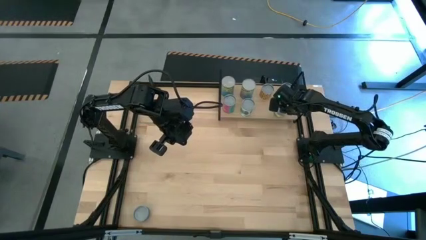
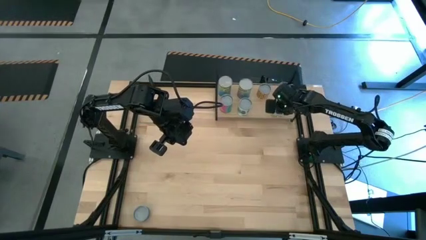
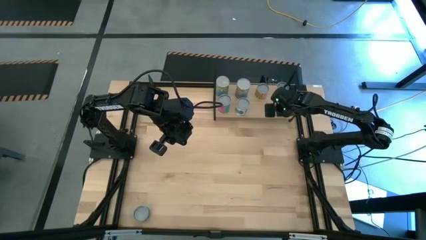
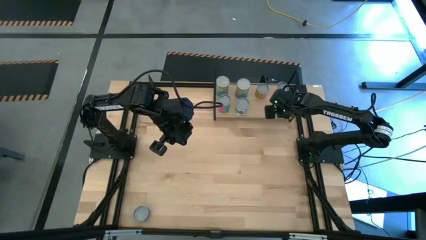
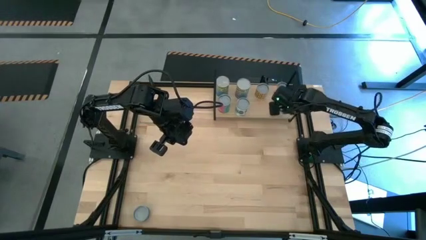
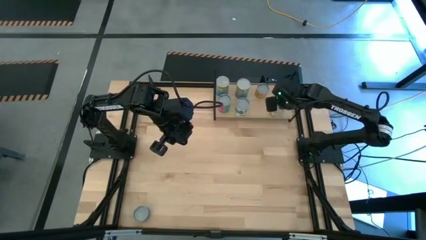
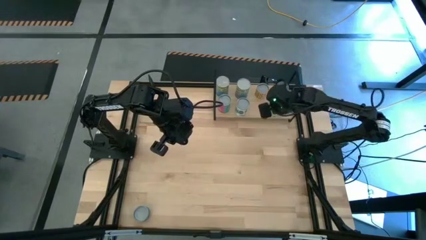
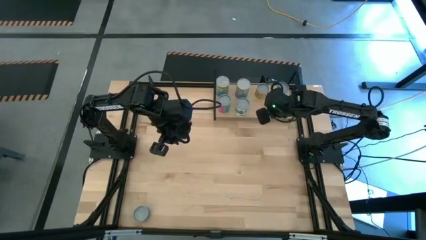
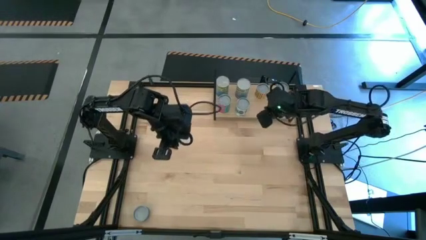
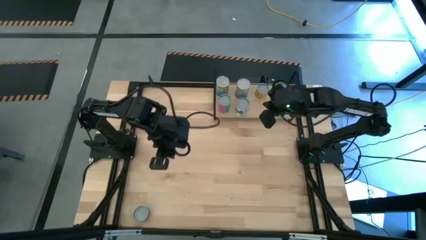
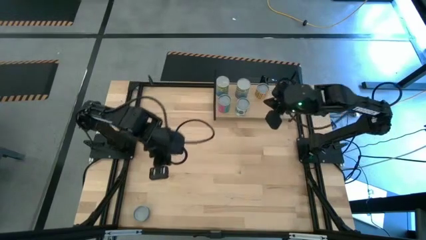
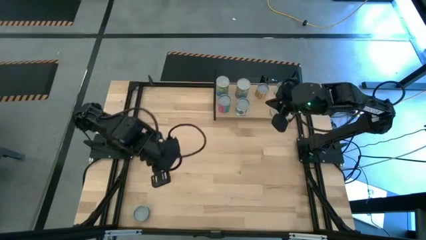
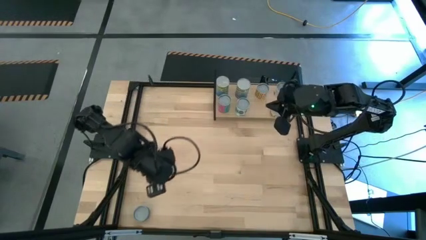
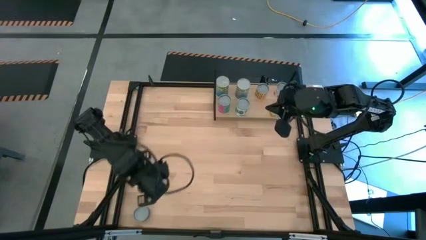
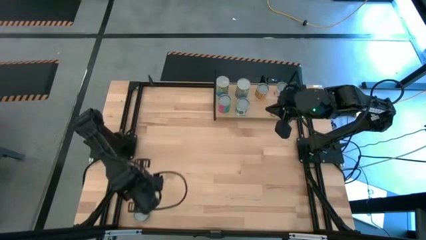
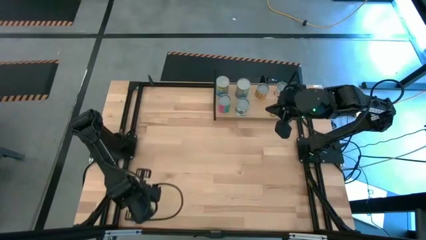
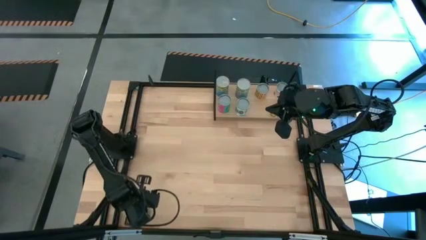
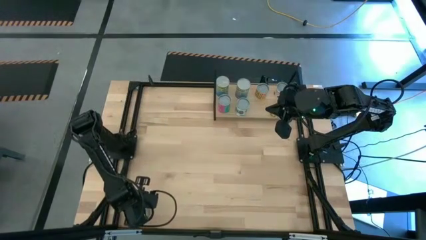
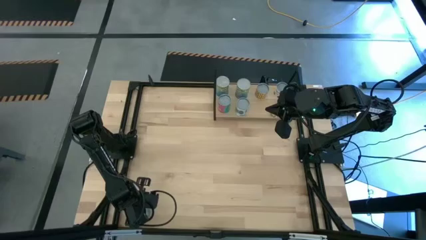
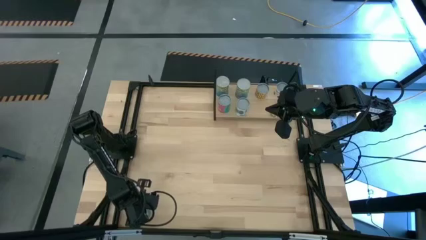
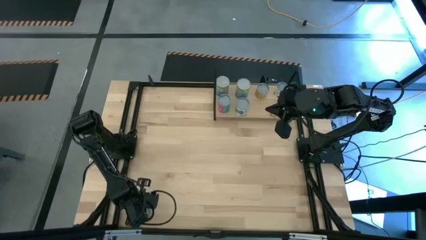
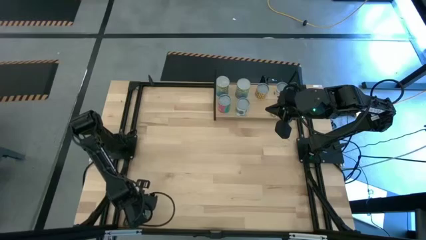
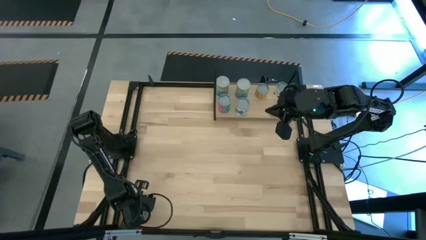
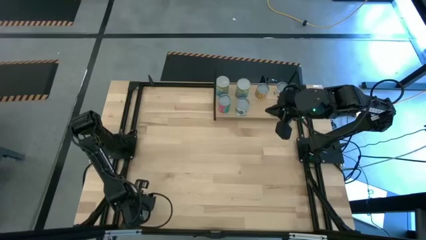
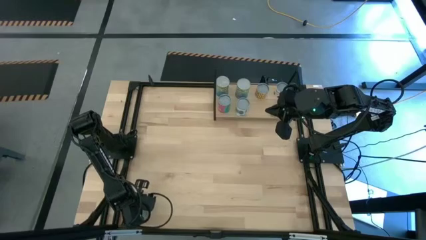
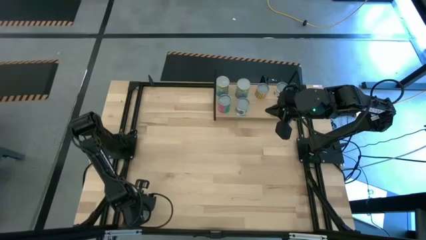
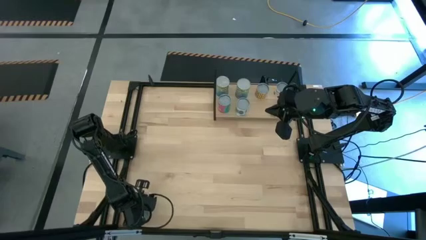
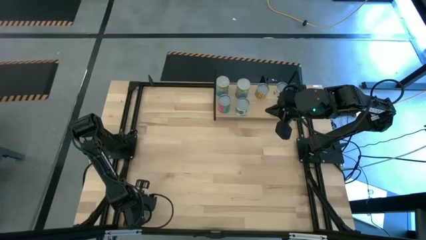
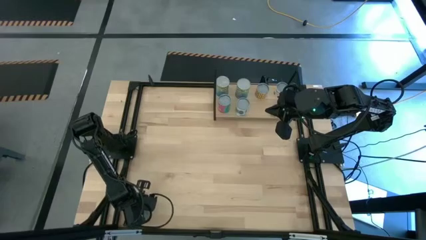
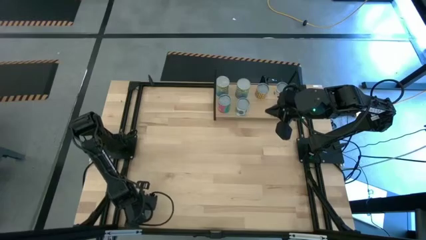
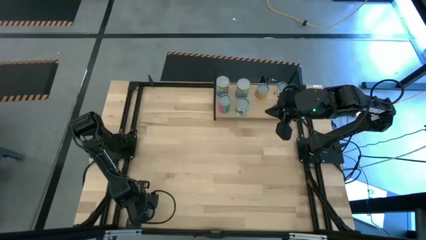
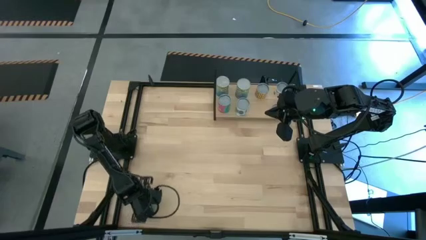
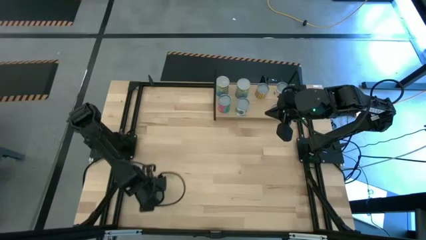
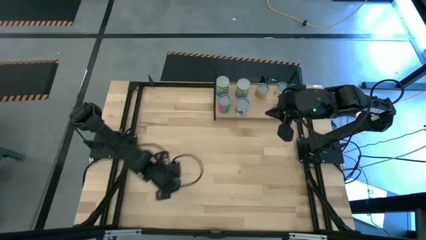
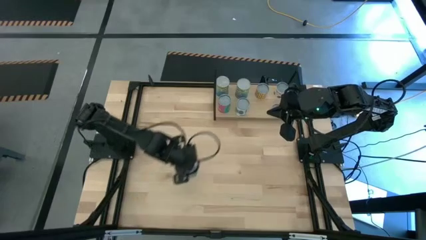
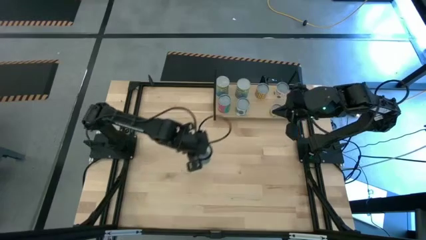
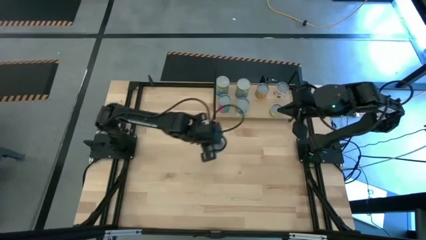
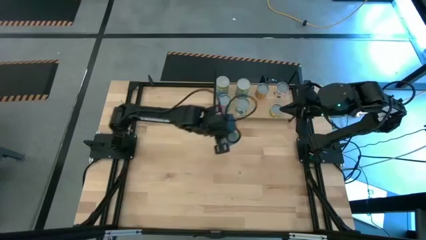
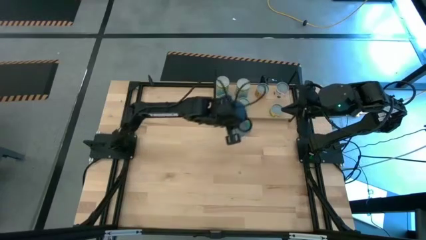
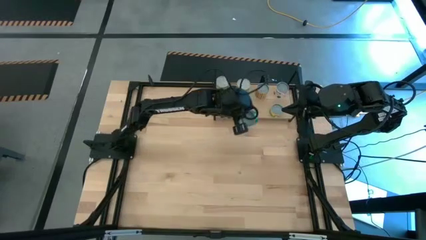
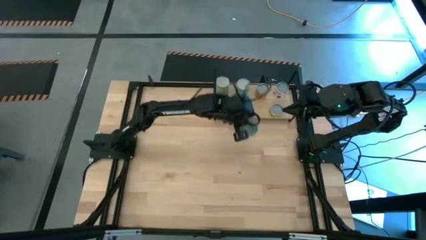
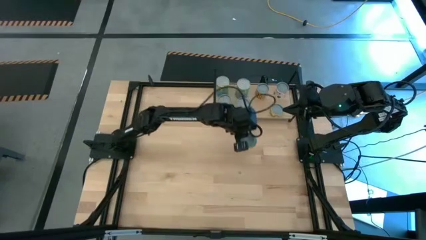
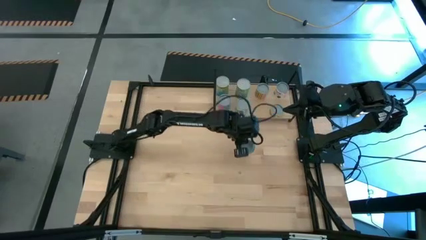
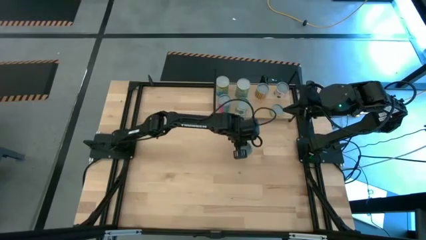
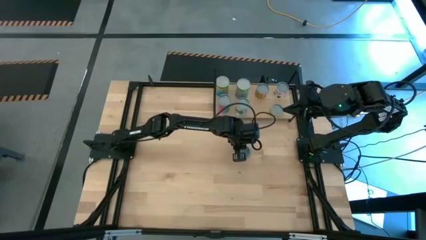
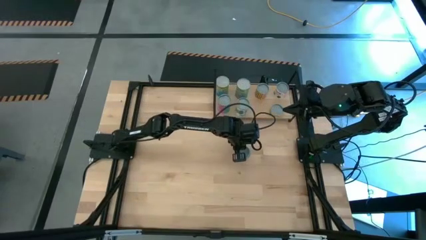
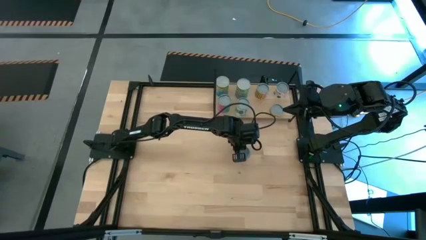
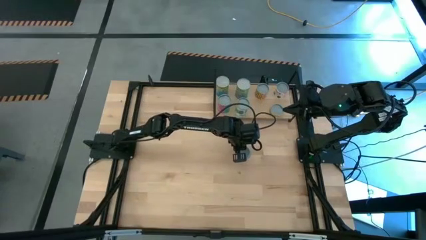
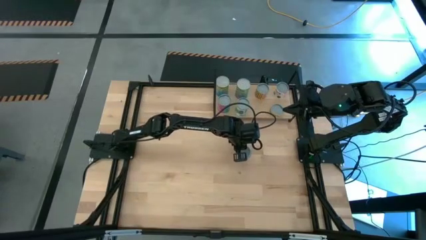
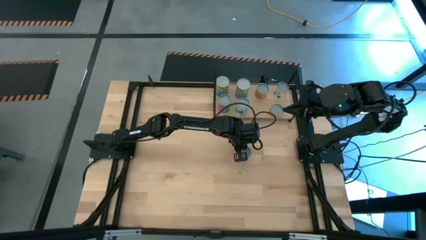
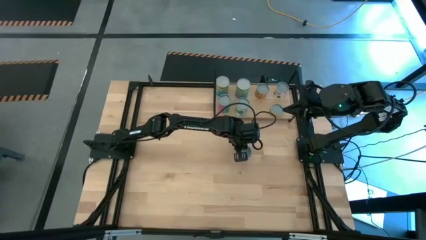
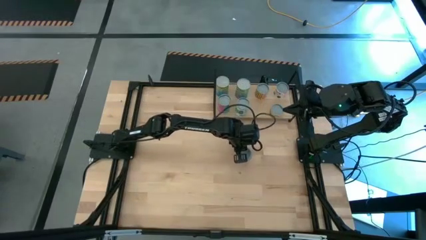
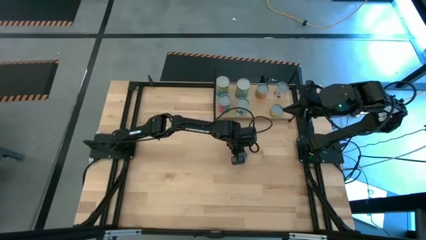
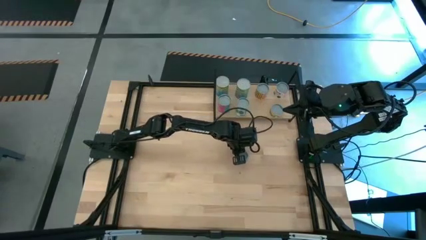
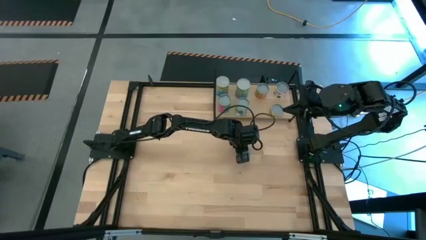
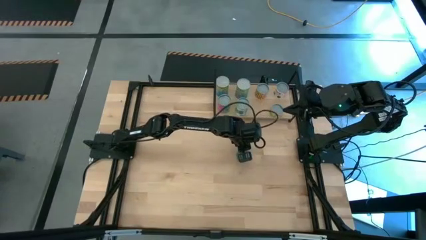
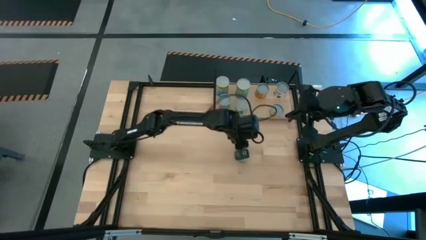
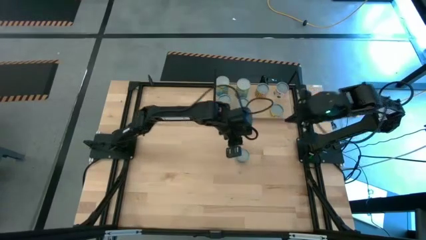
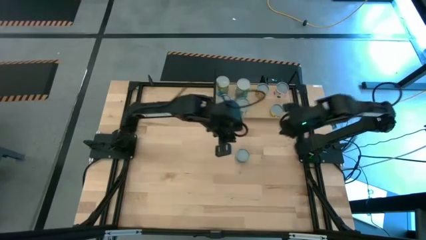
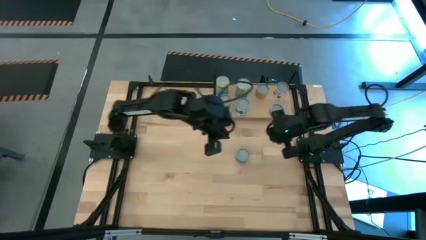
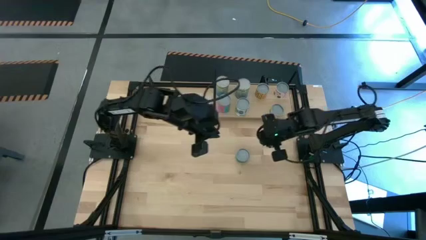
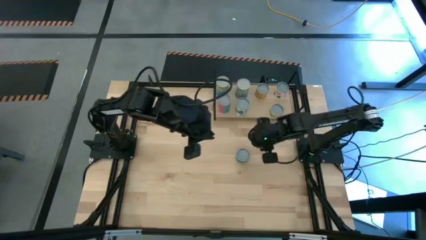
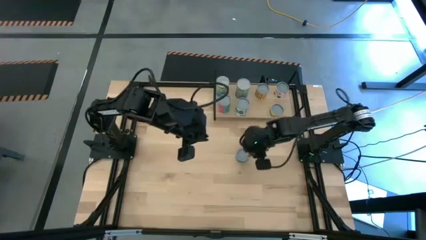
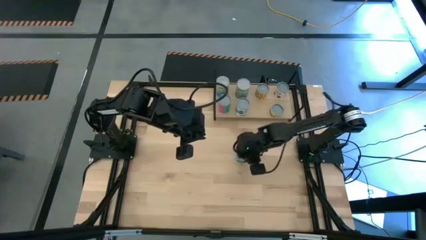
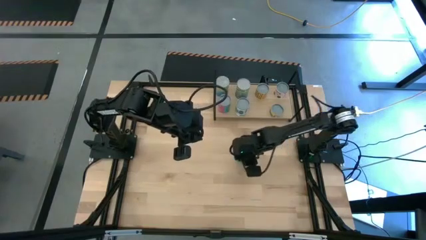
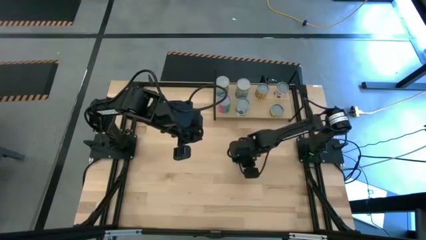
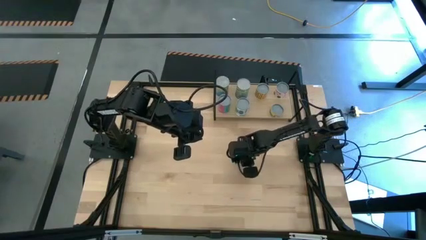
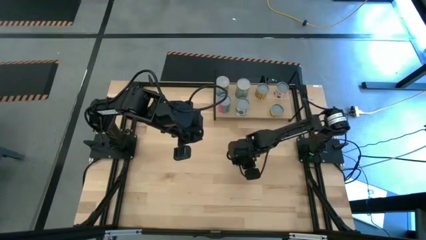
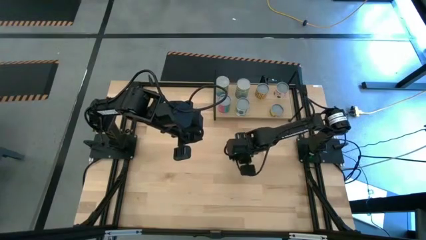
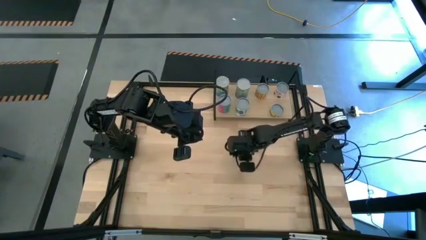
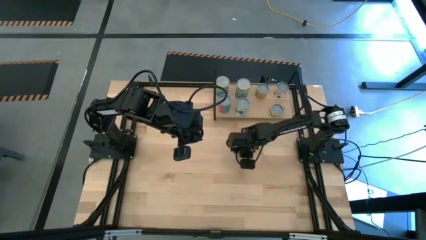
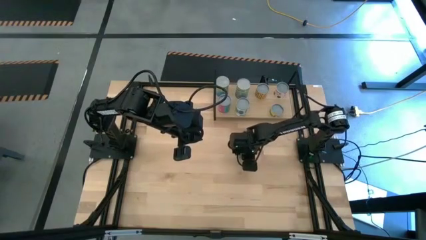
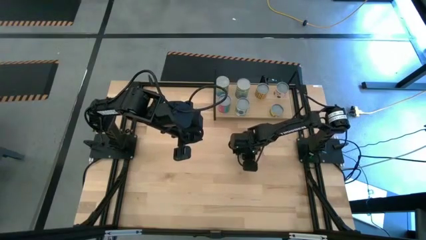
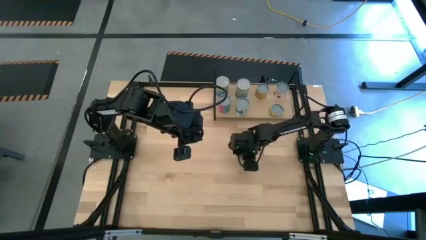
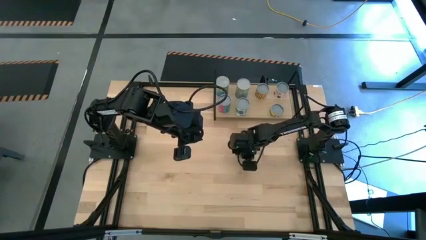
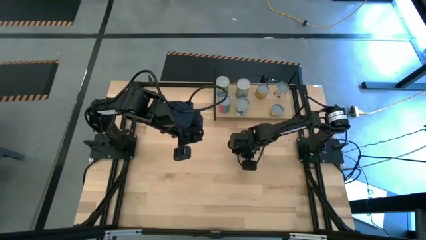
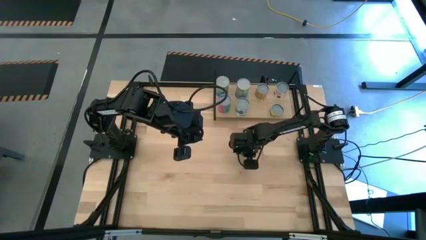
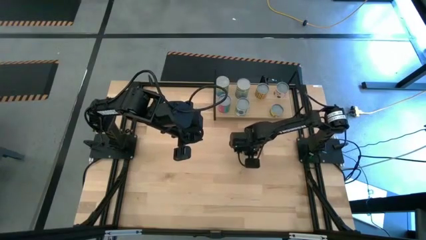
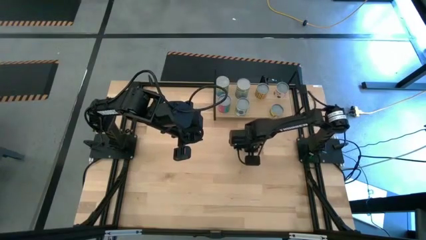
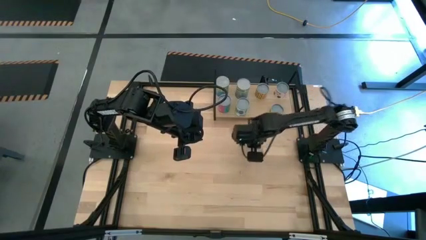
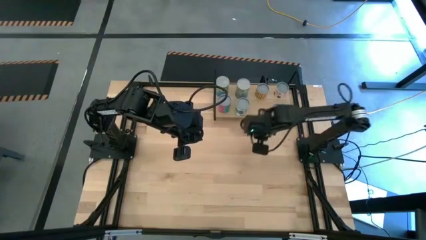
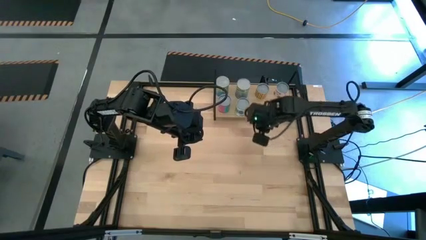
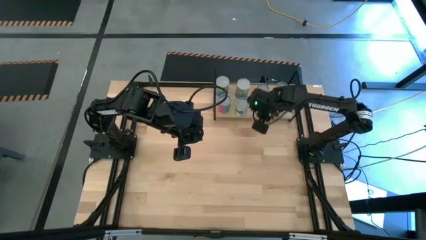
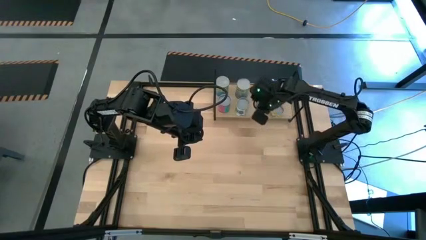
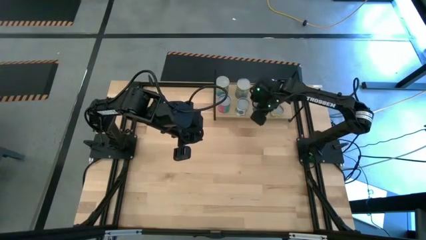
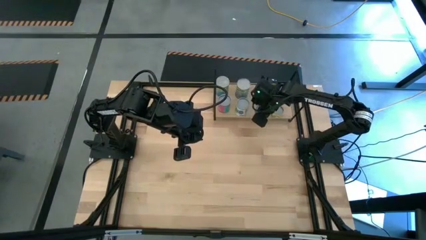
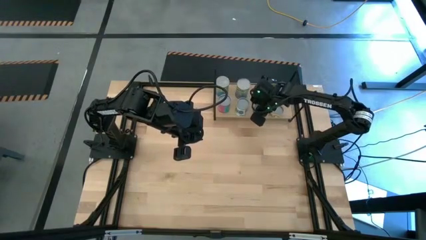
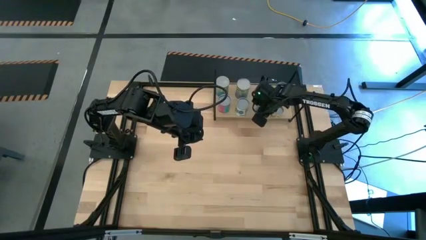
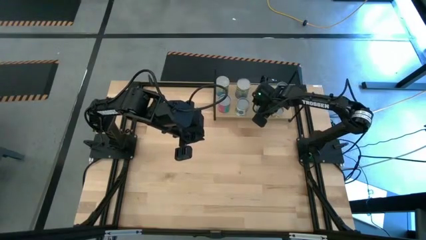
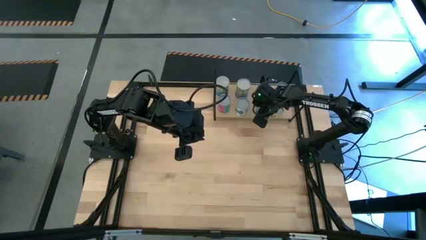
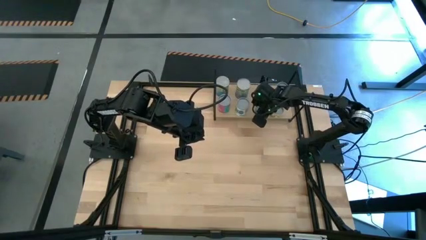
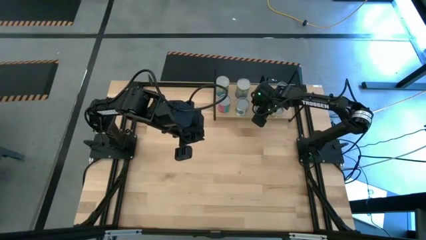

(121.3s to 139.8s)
Task: Pick and place cans onto a shelf
Put the canned tuna on the shelf
